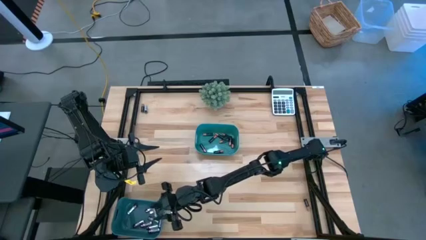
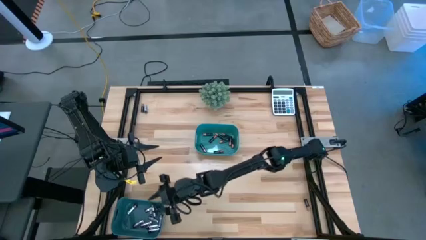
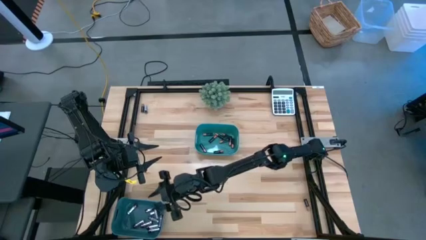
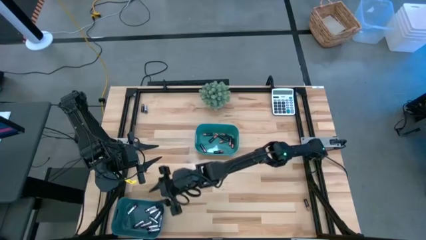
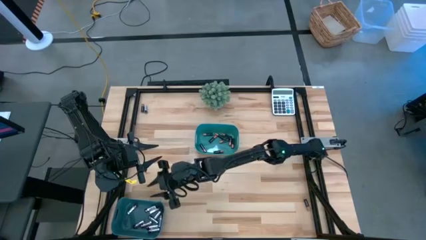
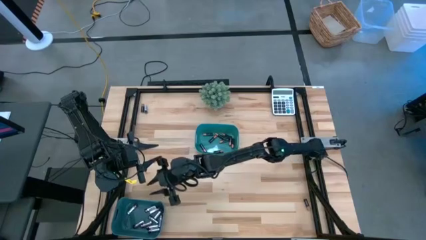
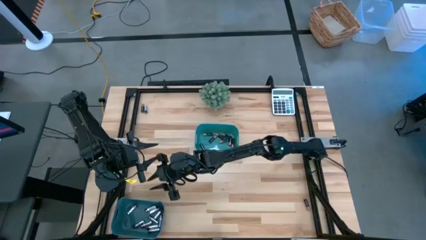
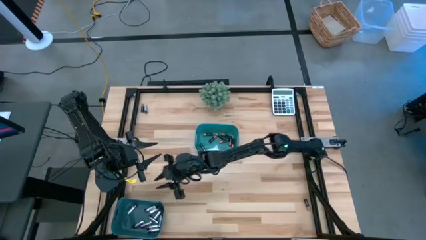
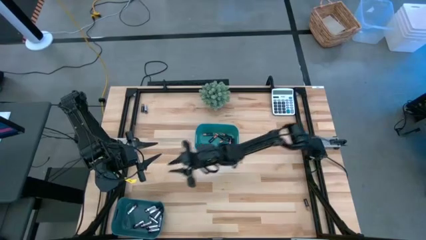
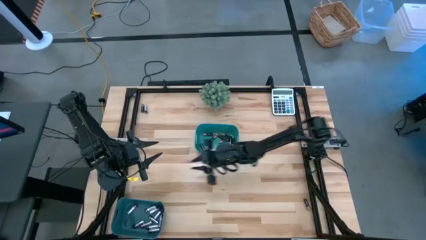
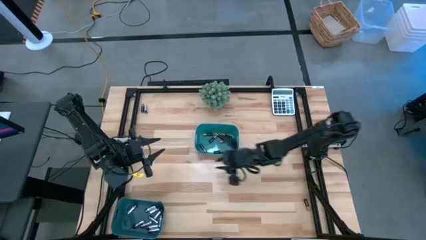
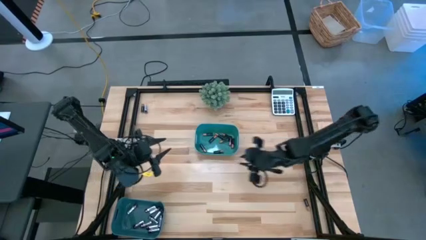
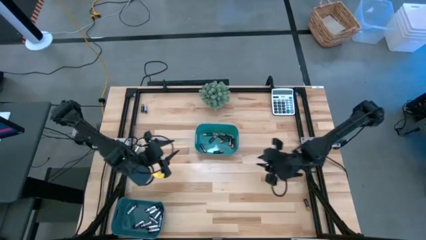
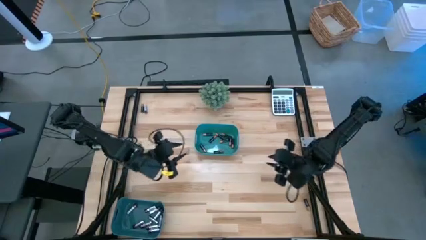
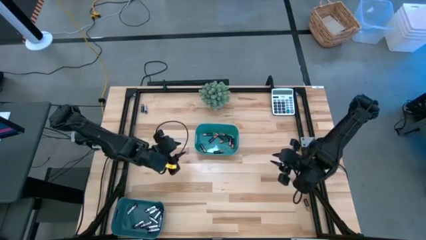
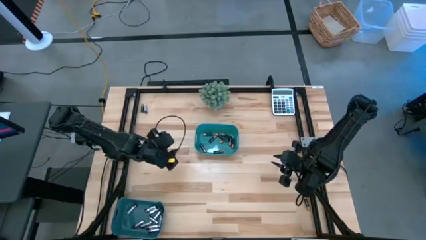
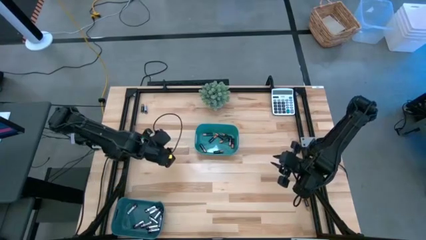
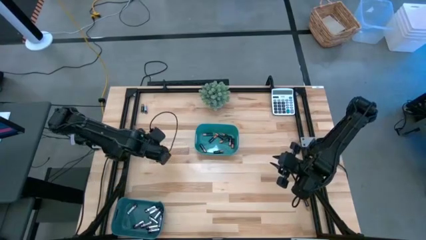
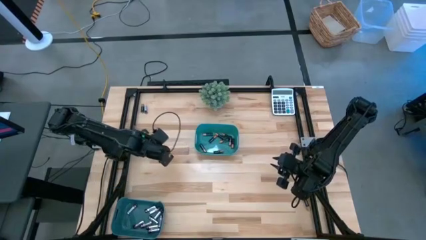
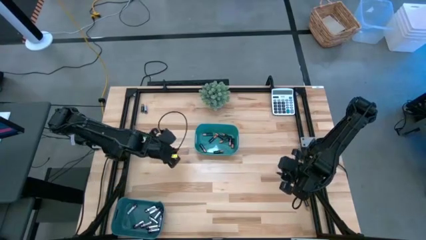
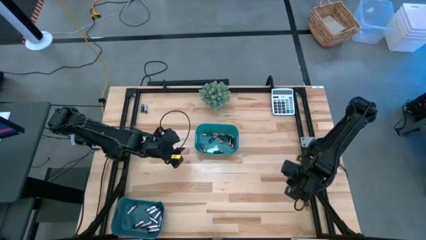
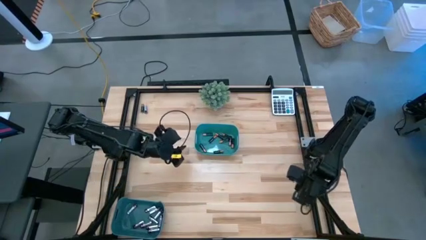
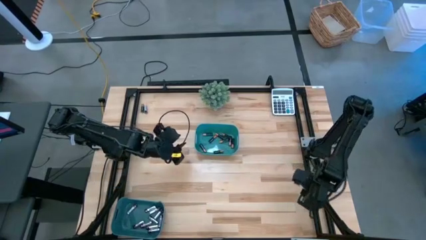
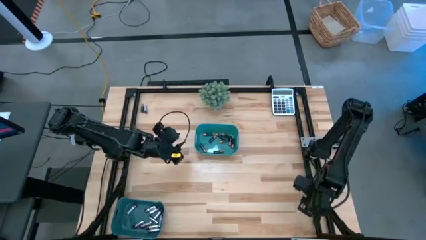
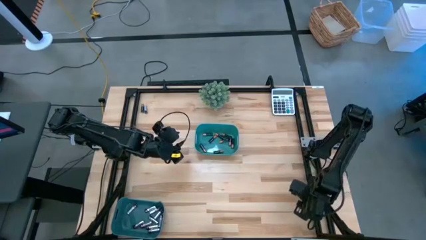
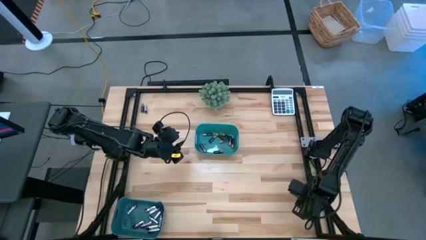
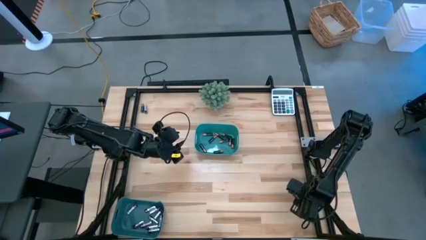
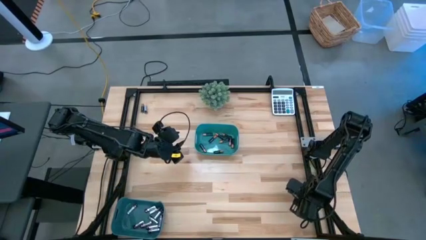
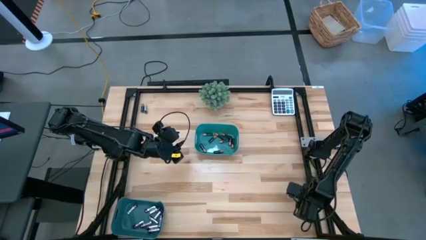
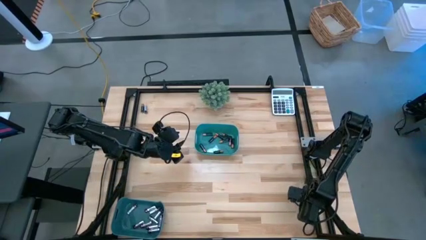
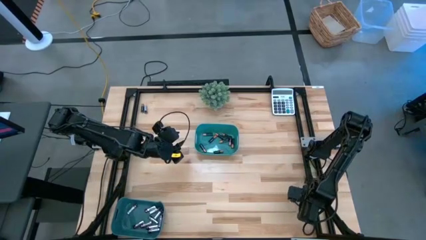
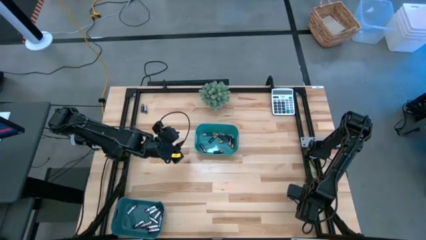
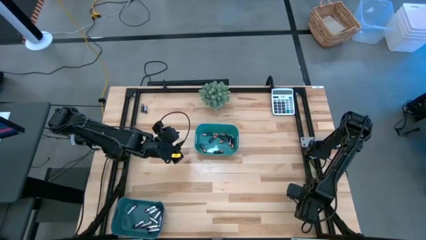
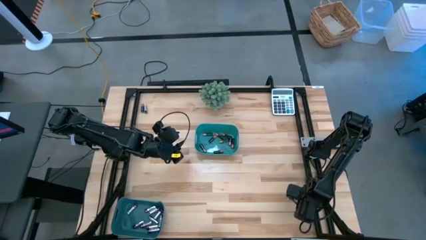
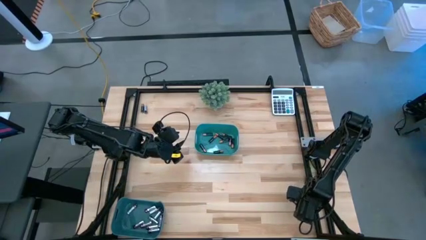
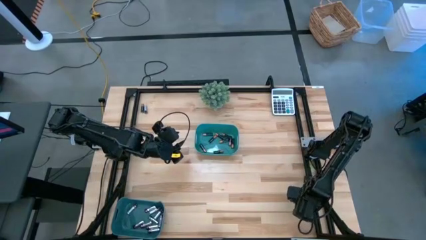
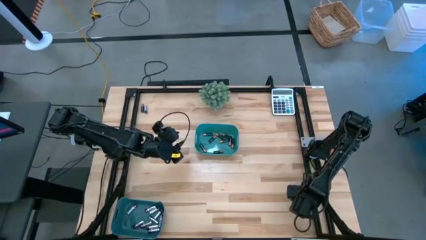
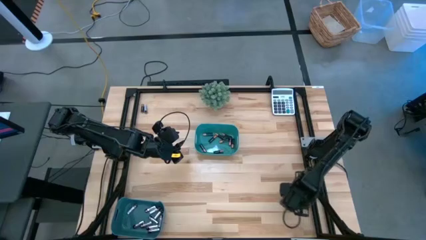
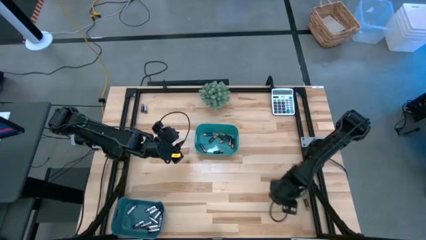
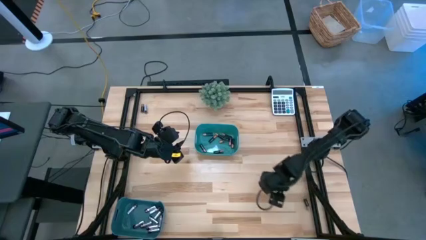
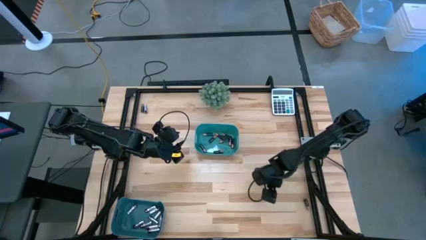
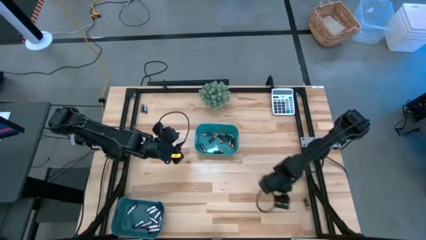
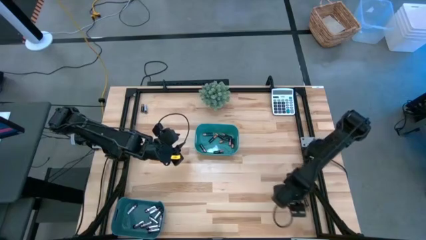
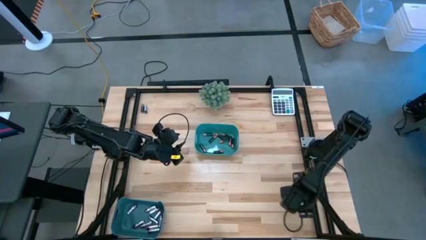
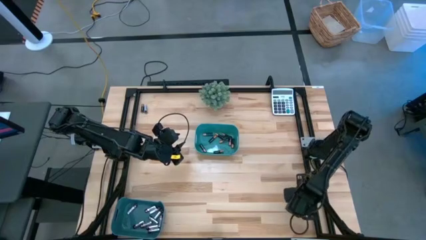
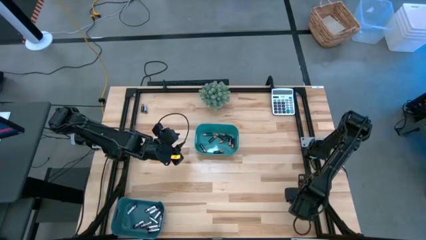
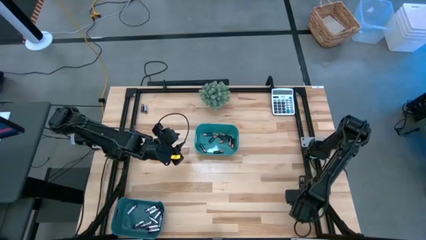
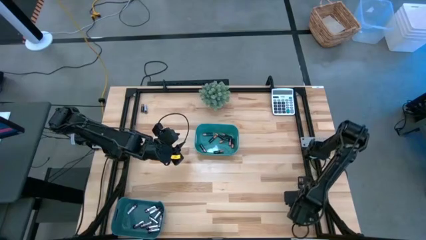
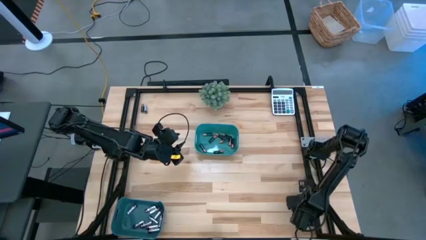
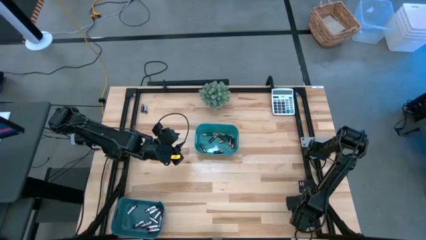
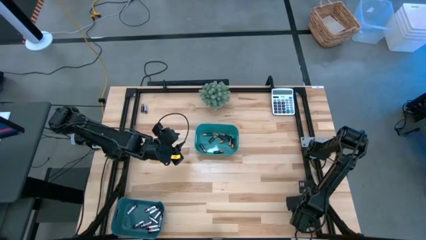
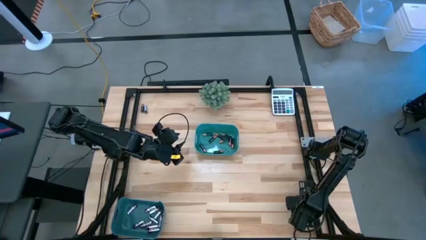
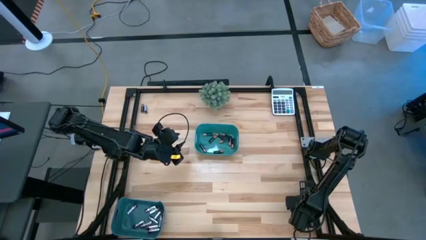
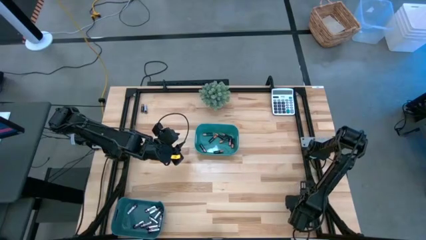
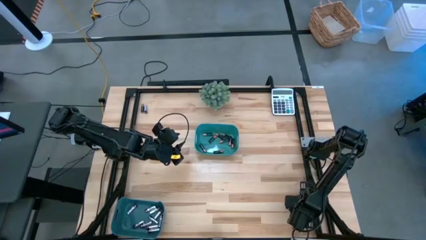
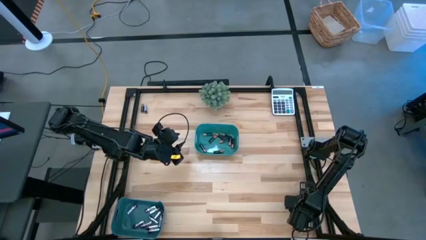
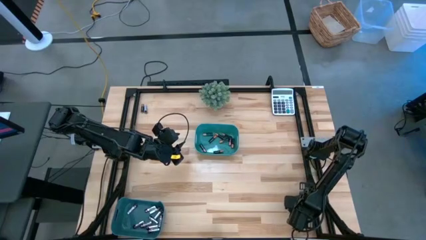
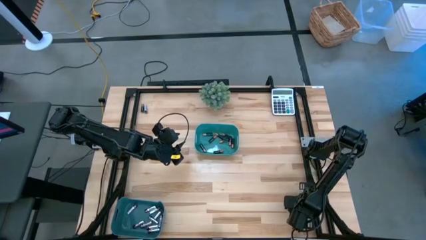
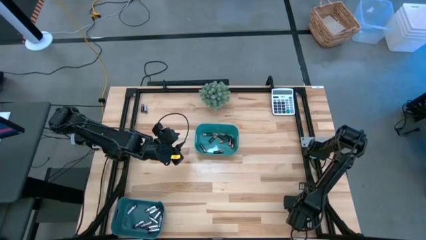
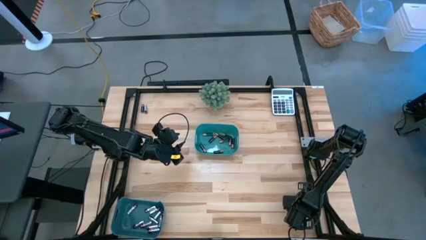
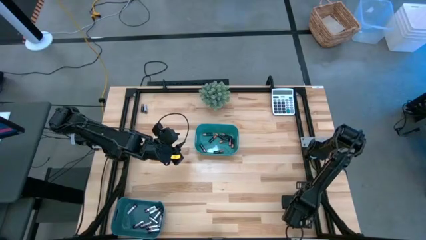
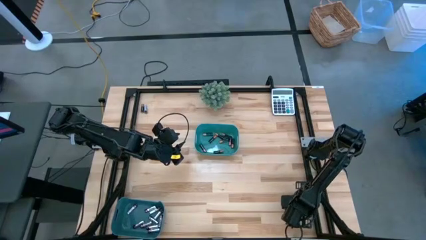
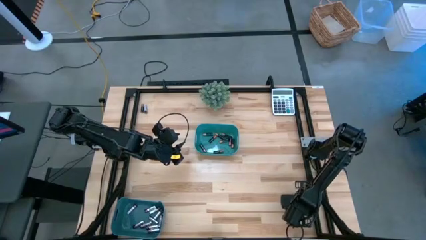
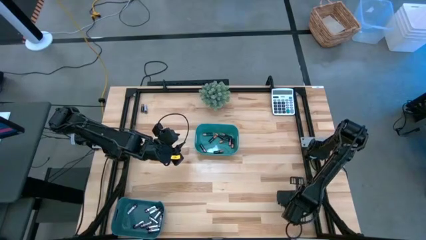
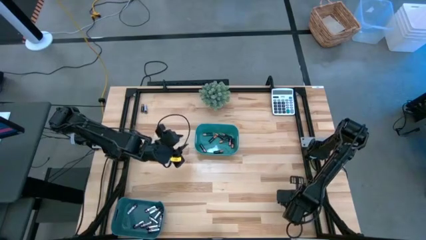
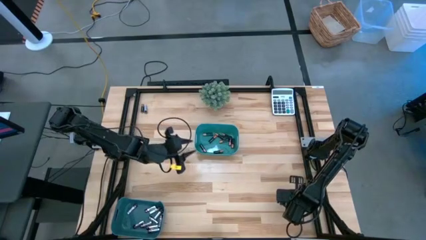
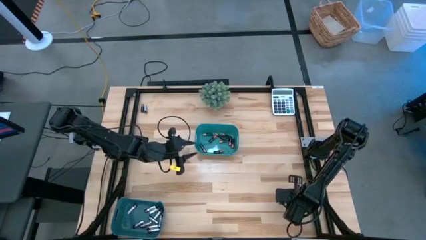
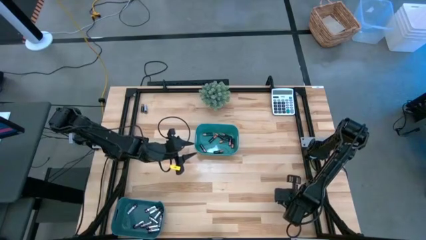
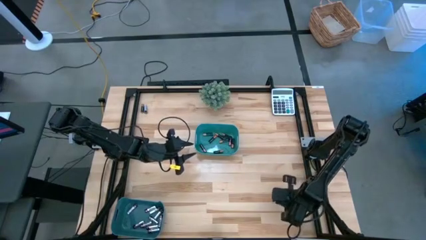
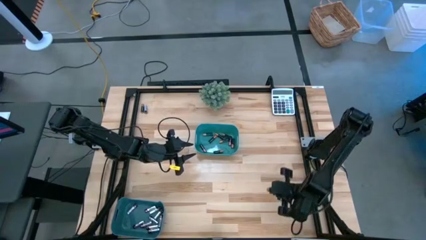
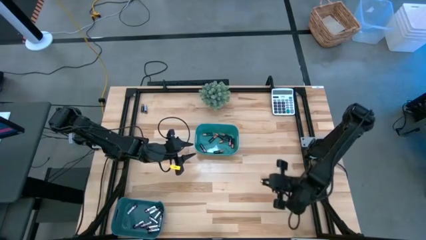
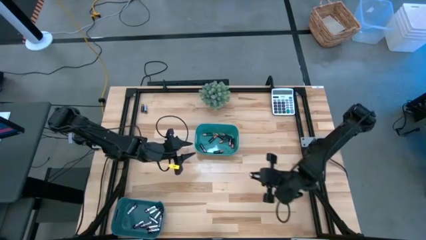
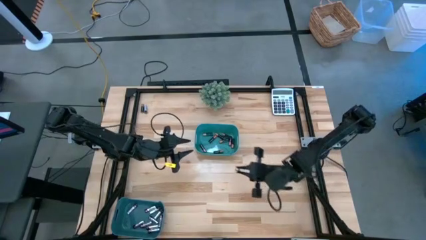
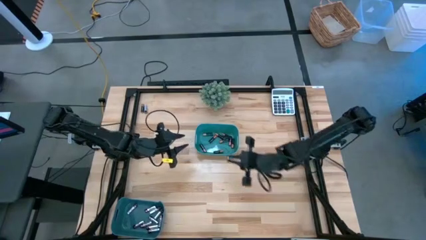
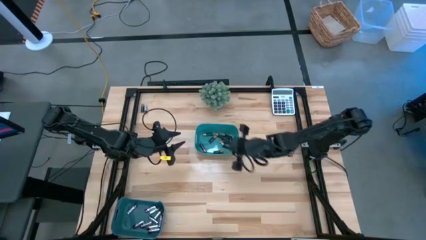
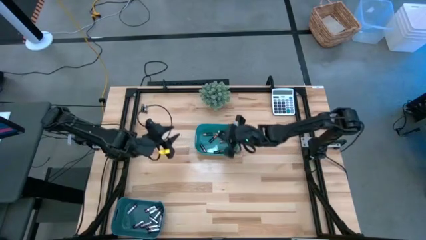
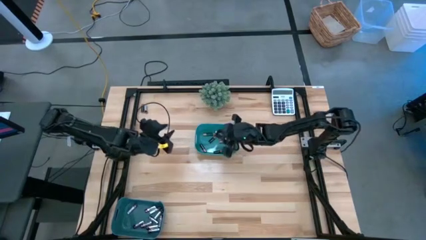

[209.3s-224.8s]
Task: Sort batteries
Put the black battery into the green bin
